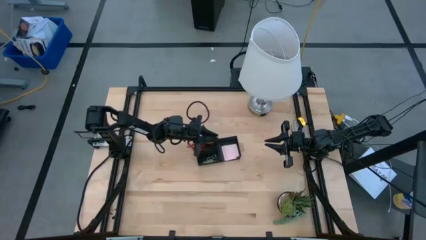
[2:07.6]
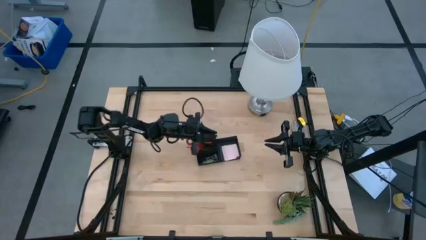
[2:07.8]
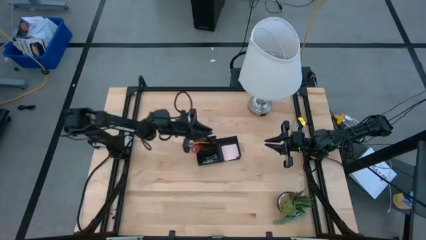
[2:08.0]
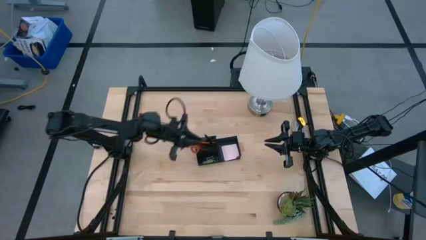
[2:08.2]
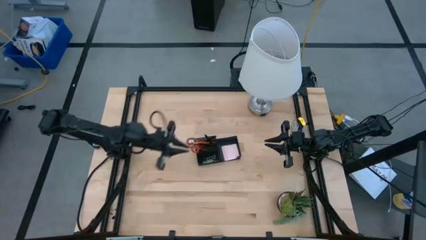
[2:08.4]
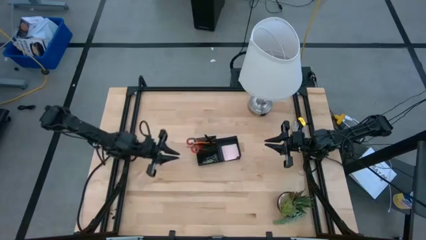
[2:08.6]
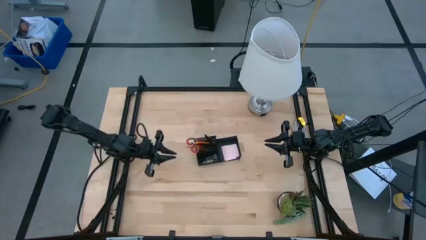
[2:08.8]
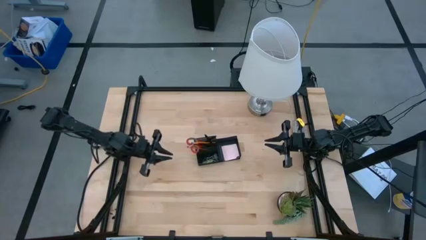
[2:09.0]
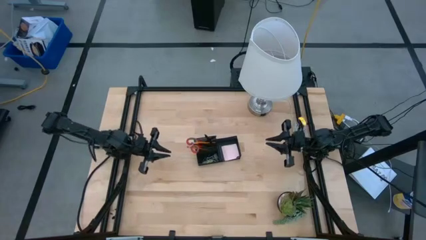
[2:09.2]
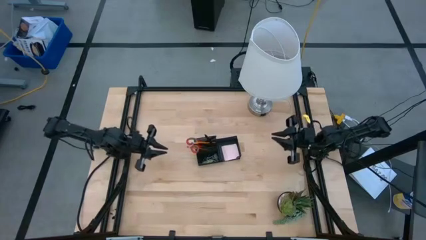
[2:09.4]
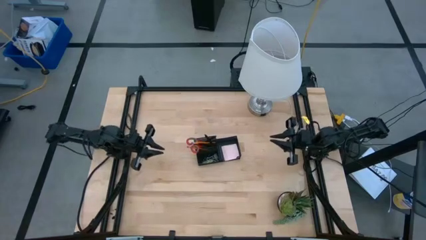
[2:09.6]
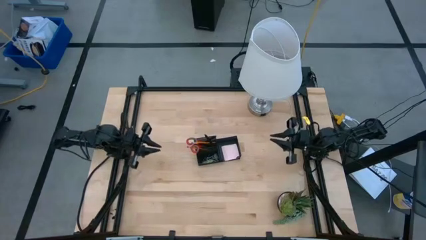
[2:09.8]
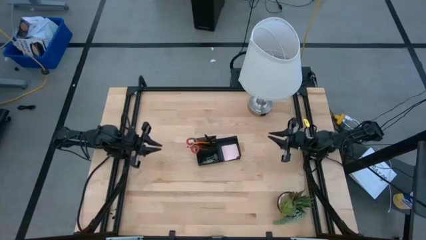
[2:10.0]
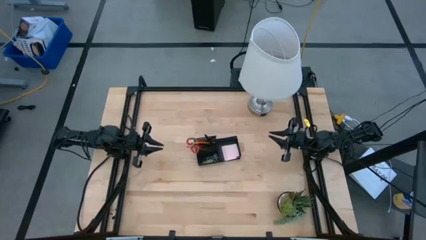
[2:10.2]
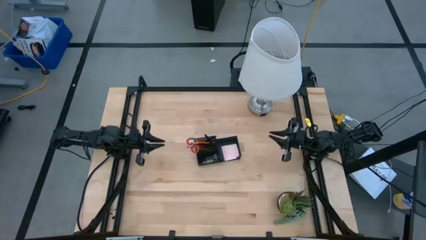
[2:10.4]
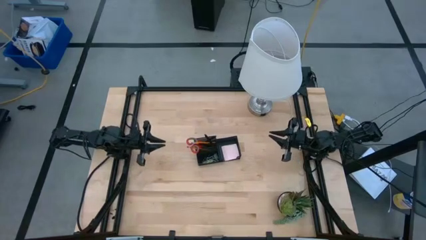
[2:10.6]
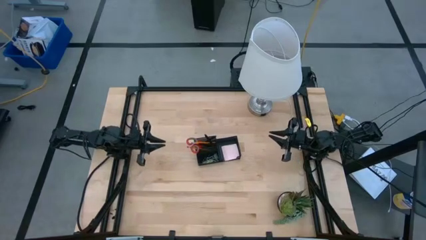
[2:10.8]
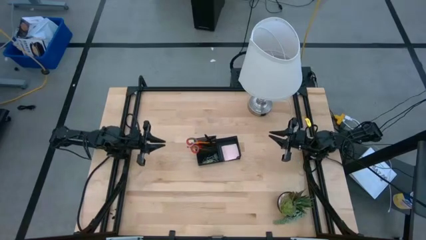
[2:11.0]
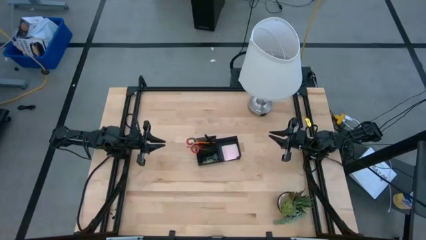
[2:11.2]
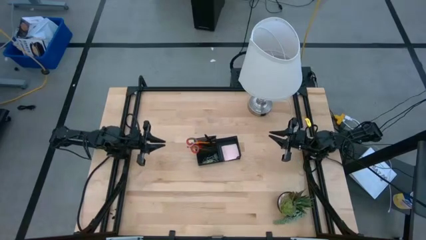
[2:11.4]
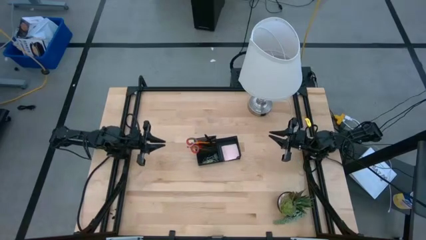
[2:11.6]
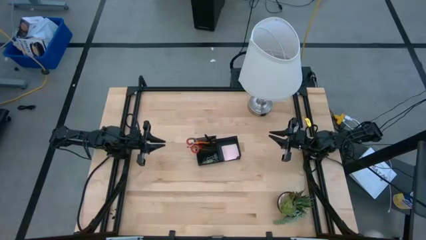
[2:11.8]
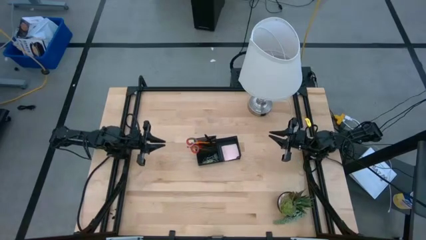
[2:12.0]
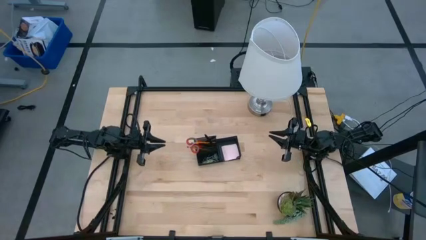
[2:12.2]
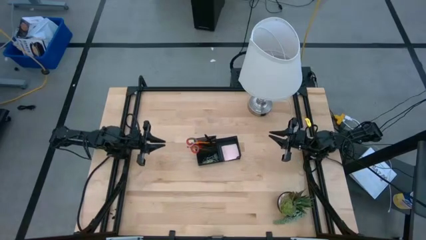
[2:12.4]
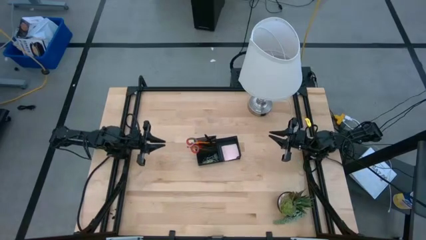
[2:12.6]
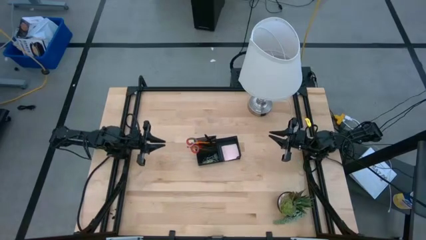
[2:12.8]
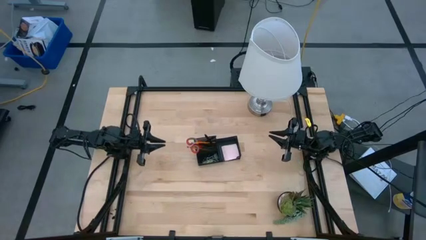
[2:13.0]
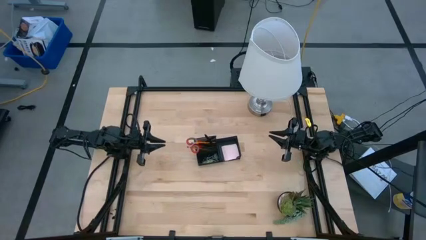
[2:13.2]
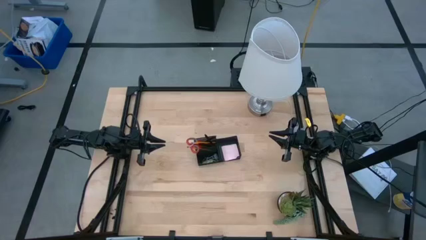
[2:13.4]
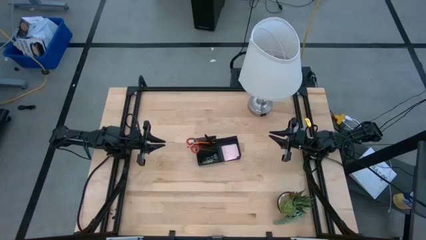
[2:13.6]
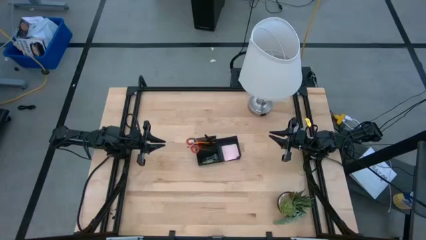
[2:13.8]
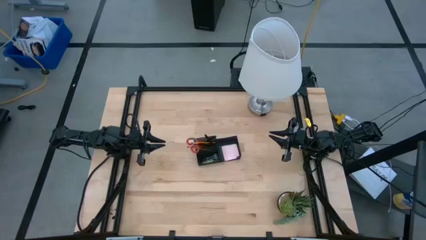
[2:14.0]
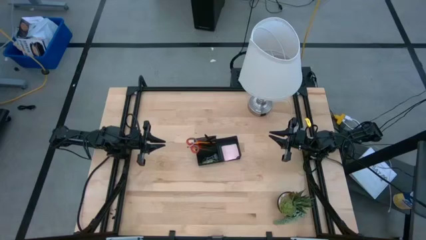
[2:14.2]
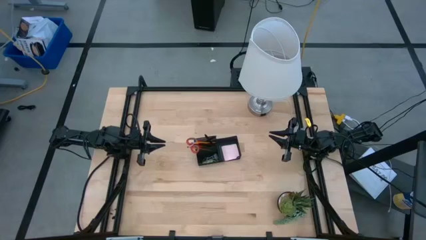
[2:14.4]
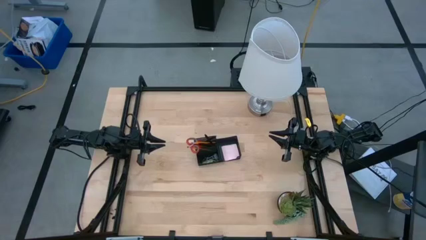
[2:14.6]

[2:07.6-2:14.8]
Task: Pick and place office supplies into organizer
Return to Home Position
